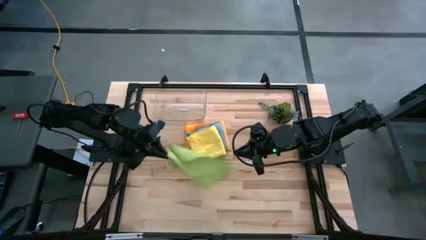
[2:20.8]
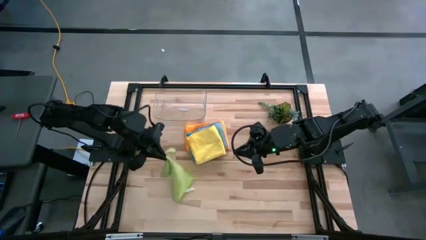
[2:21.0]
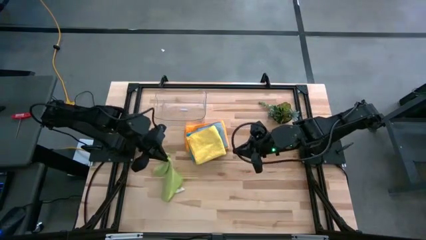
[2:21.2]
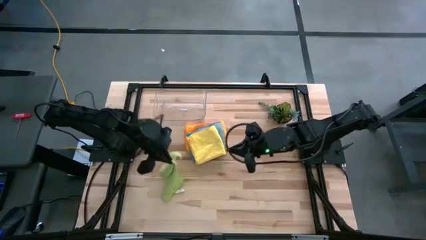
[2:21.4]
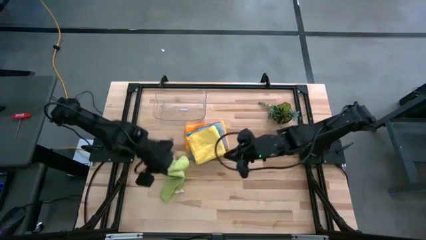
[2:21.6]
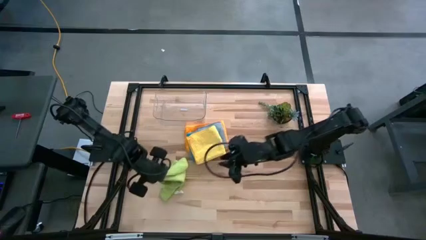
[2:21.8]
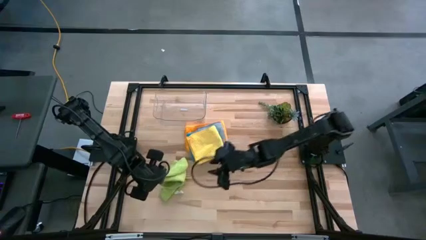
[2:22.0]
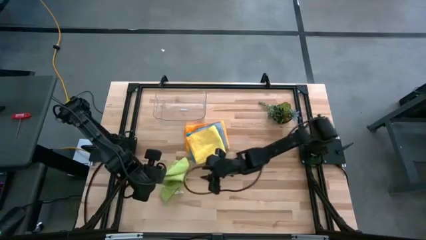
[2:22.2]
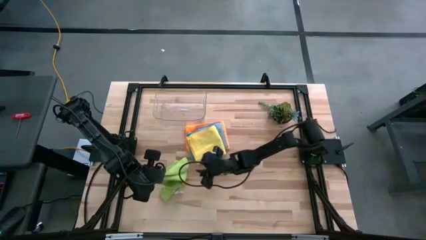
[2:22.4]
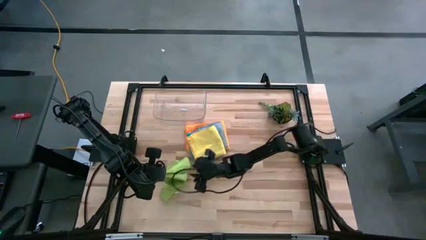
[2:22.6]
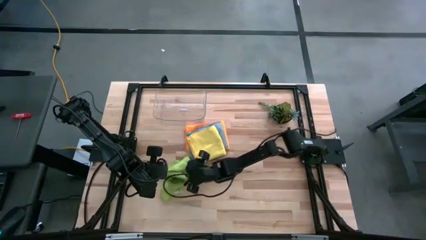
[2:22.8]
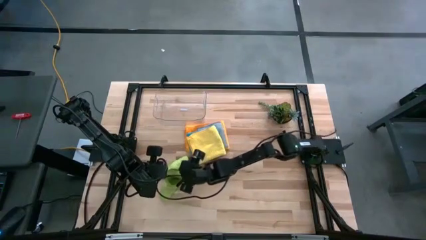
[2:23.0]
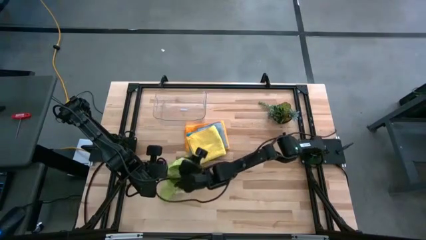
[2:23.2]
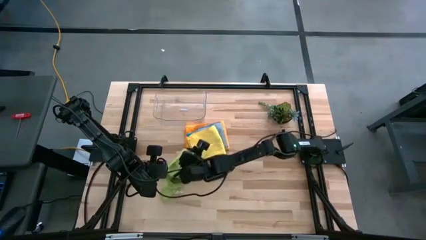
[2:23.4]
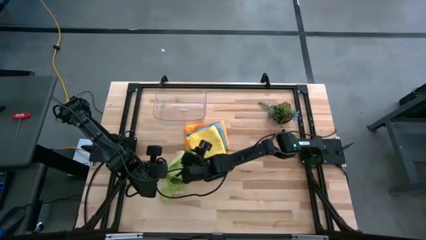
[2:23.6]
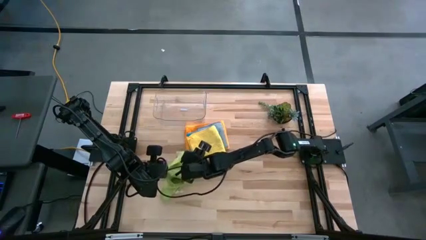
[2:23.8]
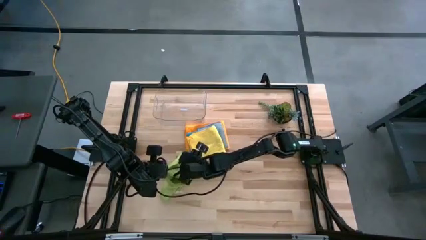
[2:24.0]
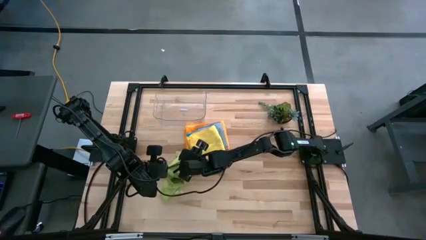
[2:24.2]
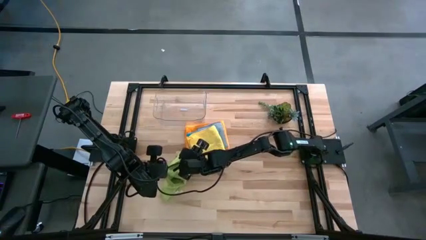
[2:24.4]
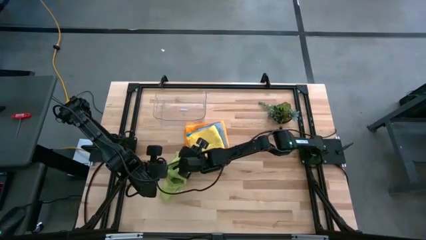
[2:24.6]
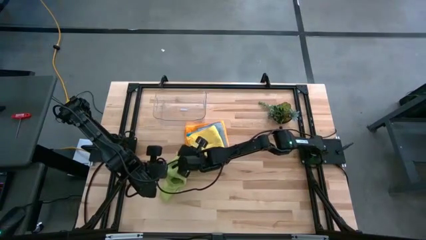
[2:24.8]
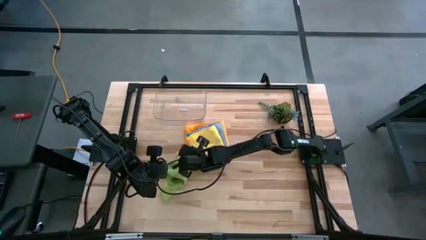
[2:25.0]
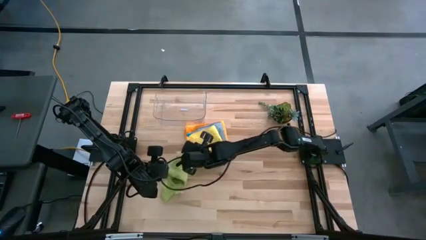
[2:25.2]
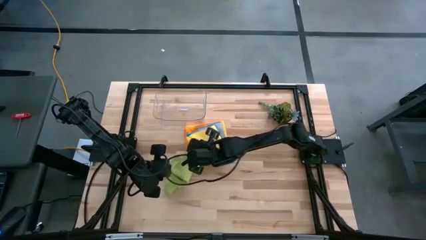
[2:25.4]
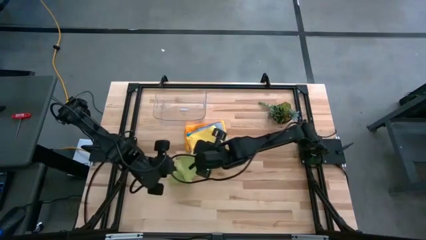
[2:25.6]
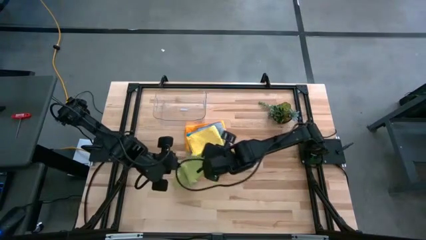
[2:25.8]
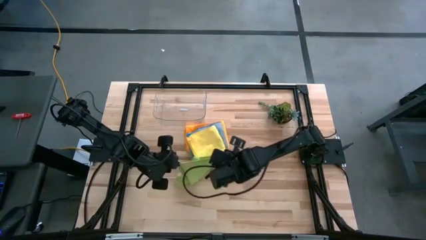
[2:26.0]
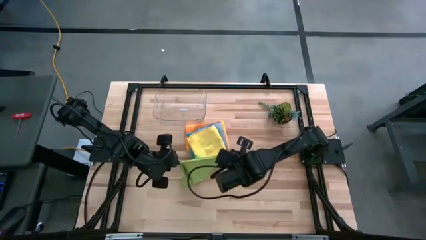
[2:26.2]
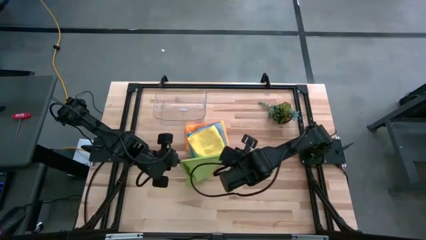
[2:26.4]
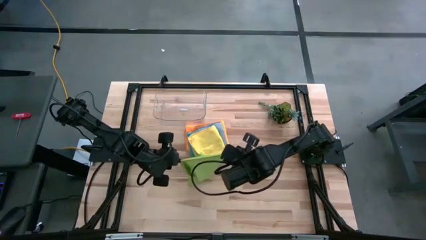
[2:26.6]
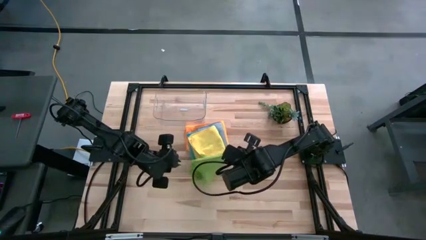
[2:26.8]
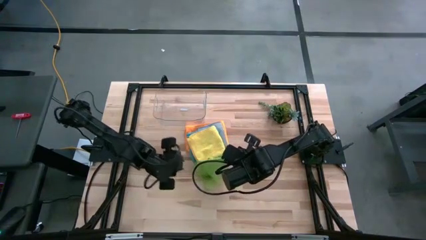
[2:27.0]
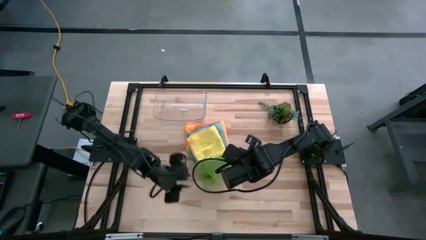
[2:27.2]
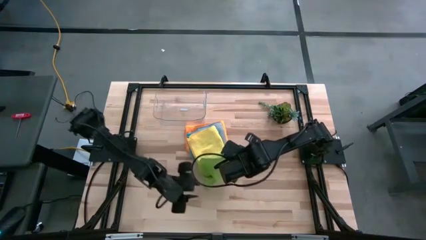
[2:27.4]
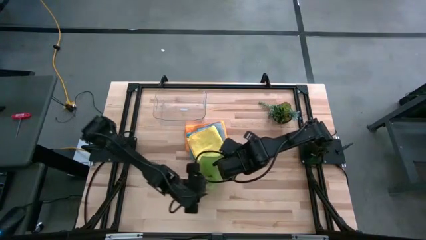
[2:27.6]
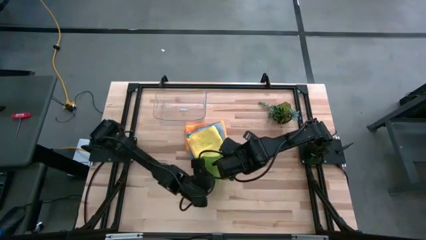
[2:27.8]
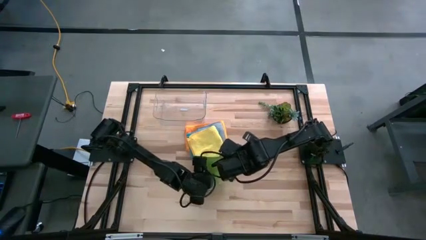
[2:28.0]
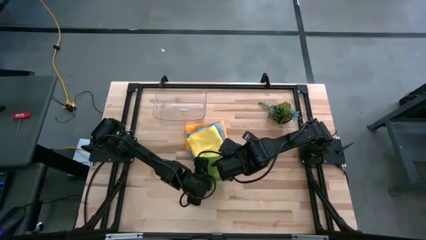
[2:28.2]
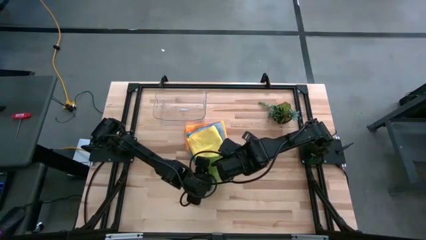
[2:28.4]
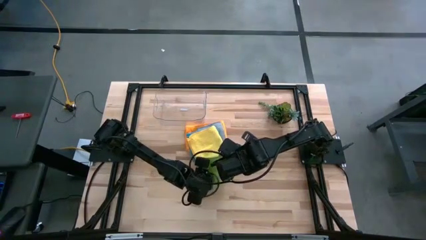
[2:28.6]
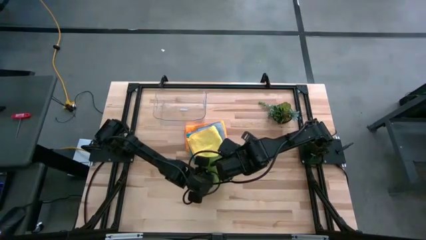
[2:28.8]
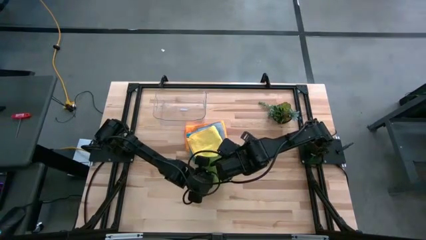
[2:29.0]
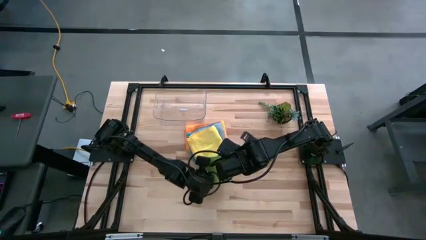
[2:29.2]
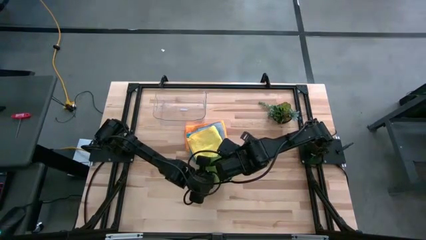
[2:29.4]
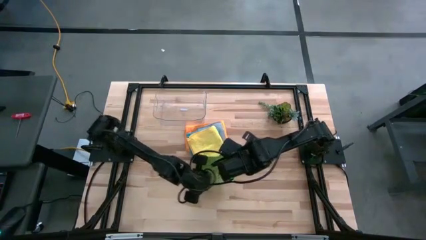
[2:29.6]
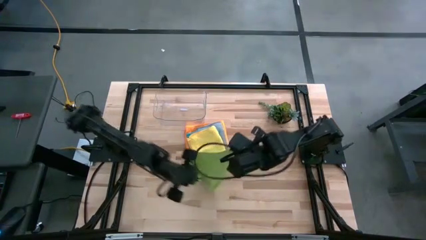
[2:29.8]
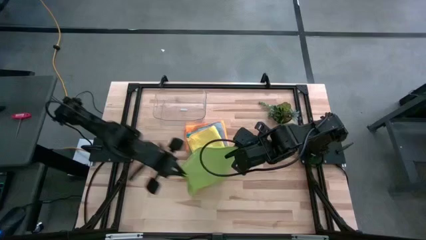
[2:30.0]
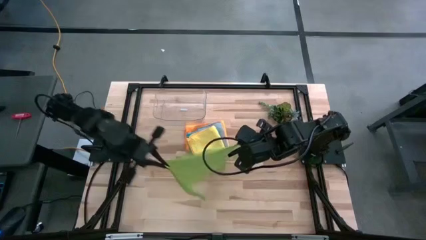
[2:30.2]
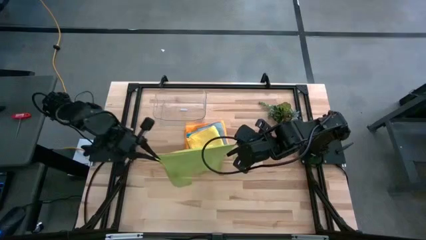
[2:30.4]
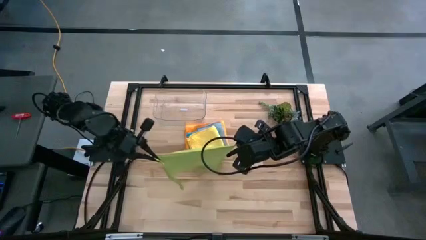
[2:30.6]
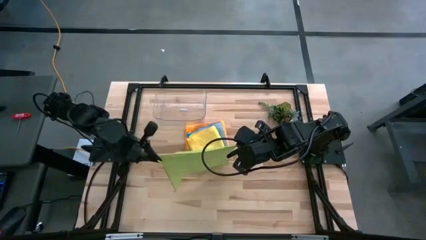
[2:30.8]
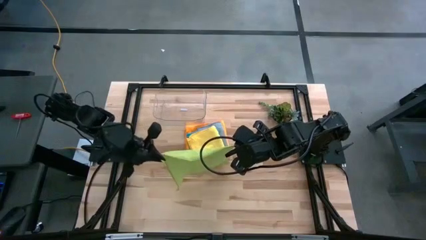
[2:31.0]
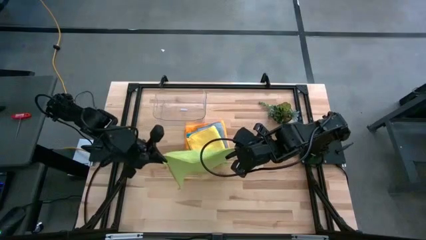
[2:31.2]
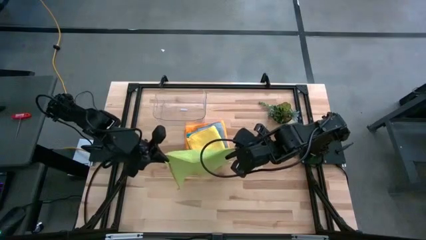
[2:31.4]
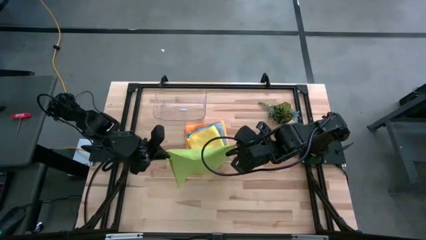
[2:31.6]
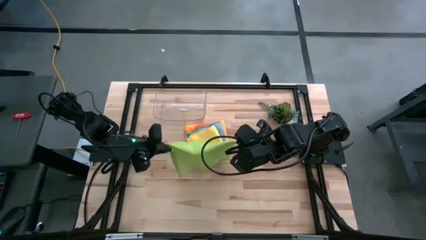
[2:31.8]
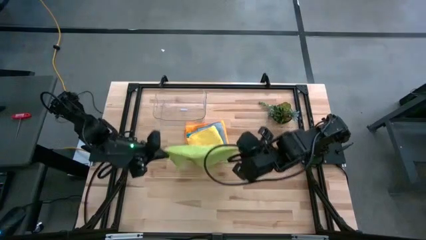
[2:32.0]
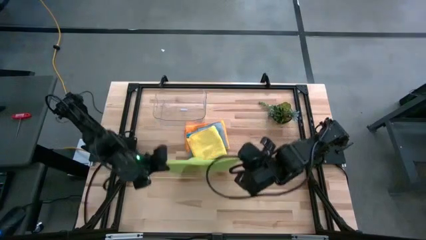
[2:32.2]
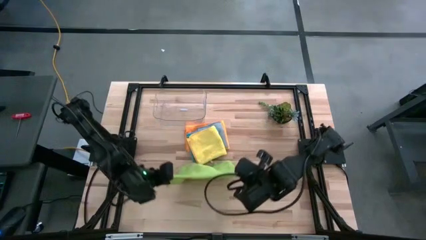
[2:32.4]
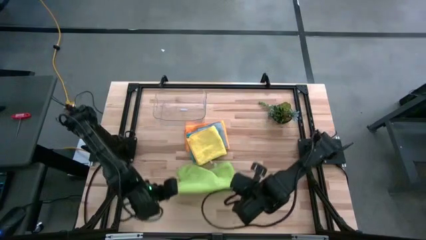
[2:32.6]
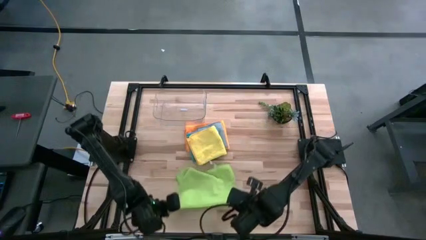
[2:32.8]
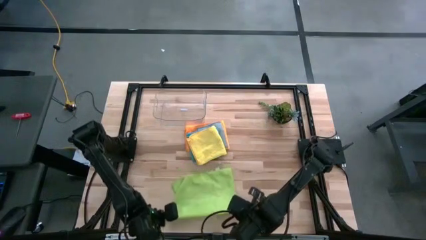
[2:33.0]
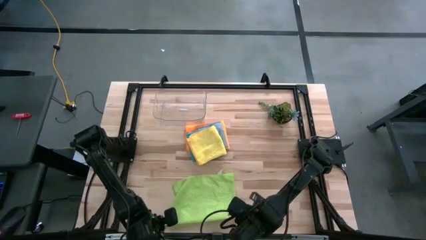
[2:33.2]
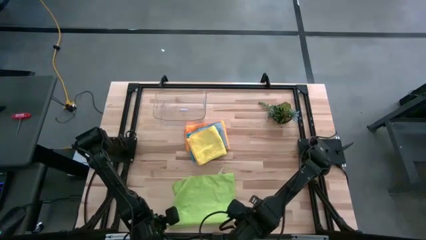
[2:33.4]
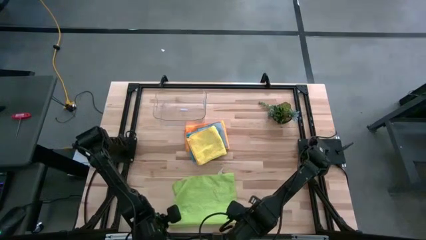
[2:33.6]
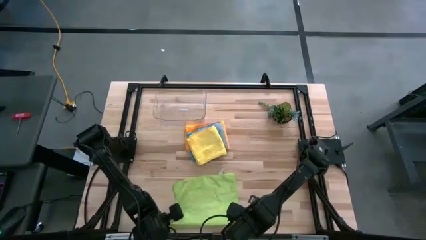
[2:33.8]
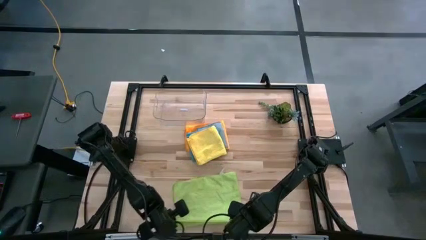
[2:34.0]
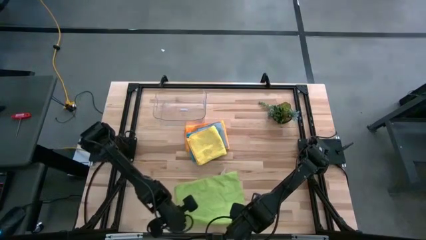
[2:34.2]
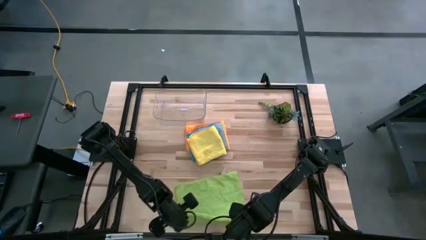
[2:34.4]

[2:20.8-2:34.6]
Task: Fold microfiber towels
Fold the green towel
